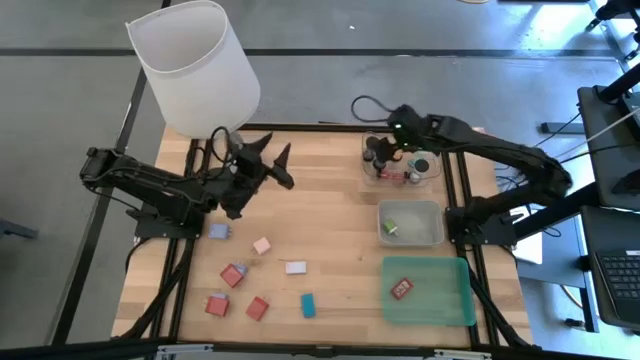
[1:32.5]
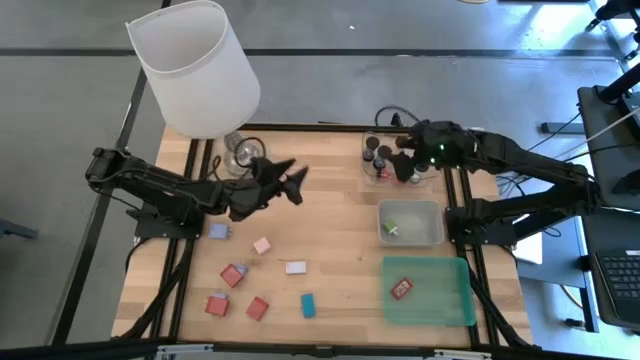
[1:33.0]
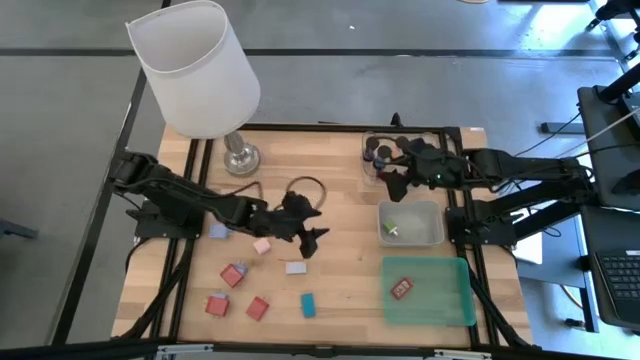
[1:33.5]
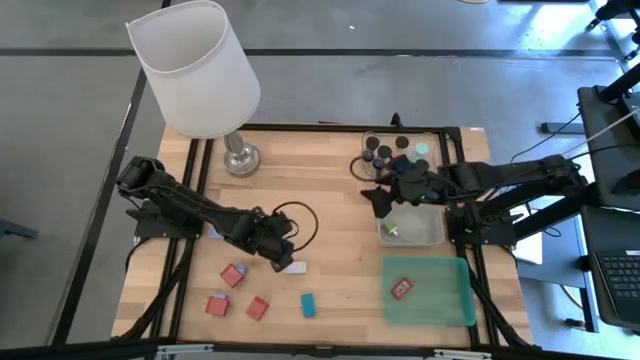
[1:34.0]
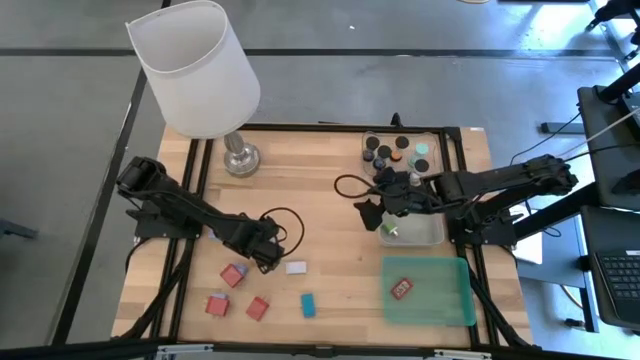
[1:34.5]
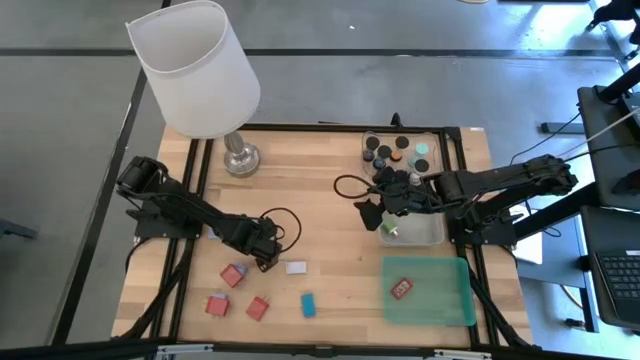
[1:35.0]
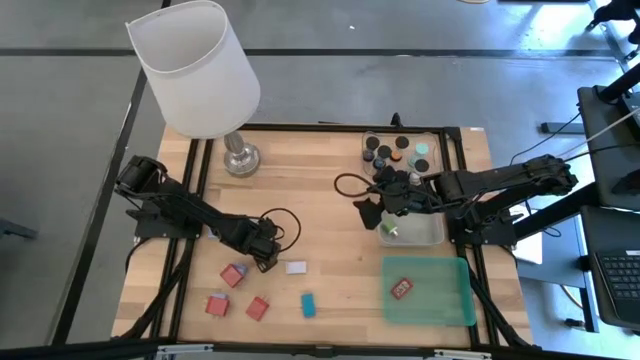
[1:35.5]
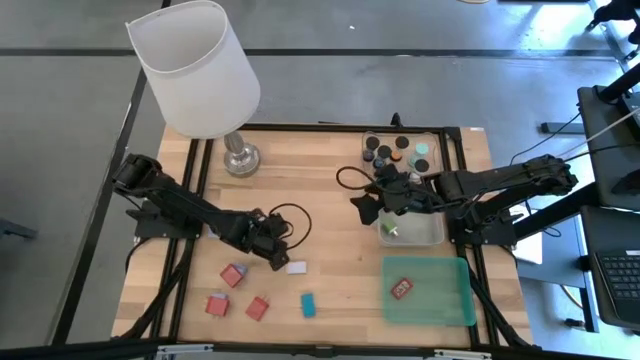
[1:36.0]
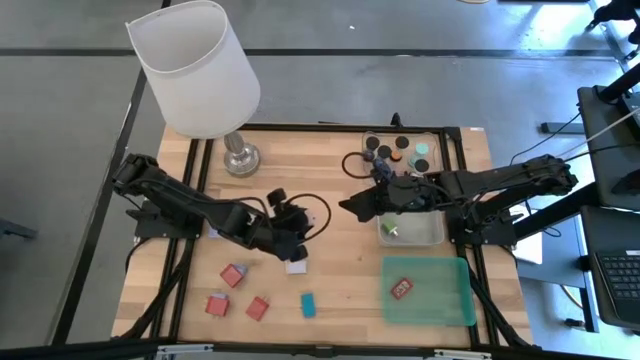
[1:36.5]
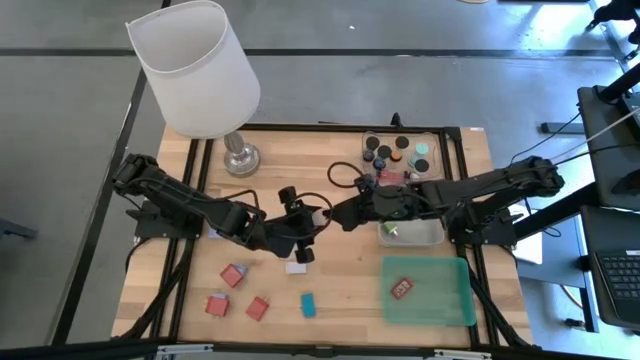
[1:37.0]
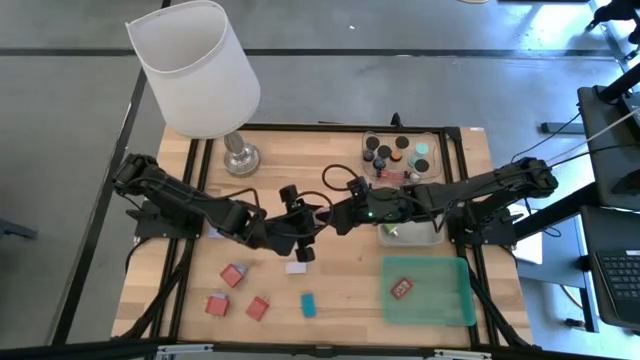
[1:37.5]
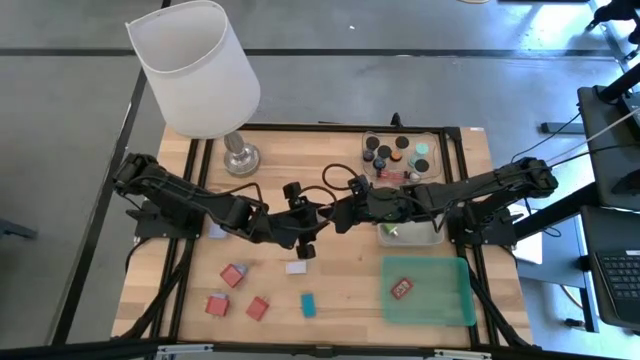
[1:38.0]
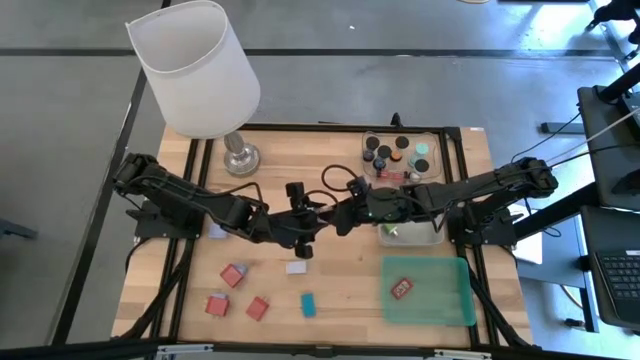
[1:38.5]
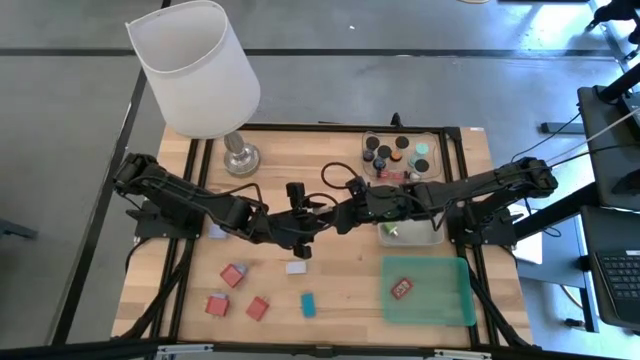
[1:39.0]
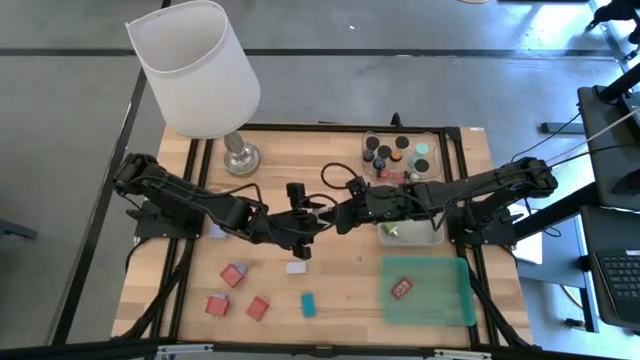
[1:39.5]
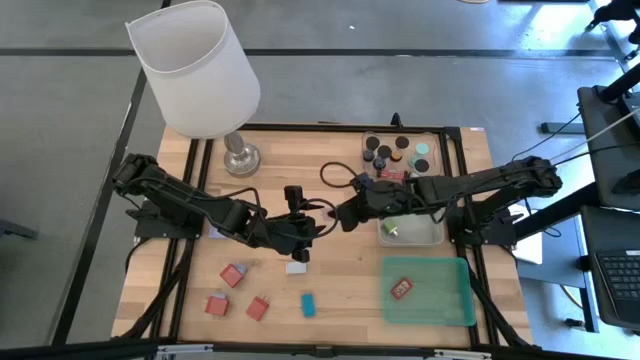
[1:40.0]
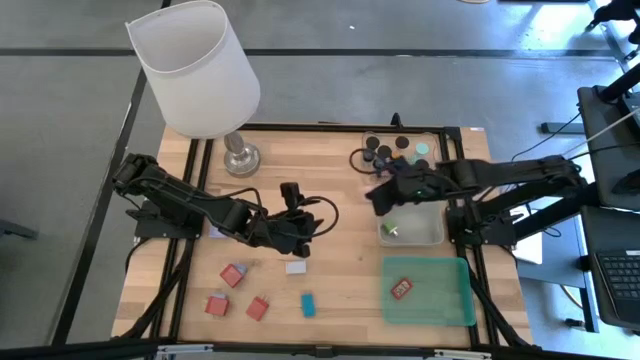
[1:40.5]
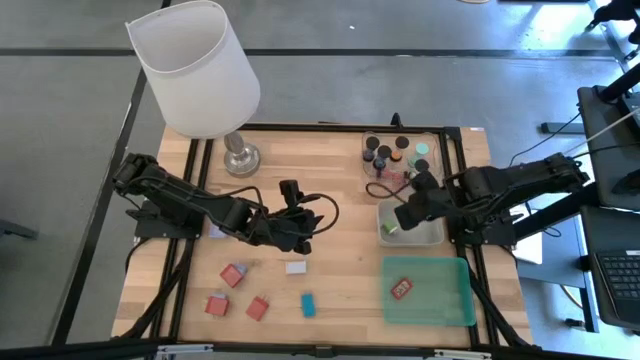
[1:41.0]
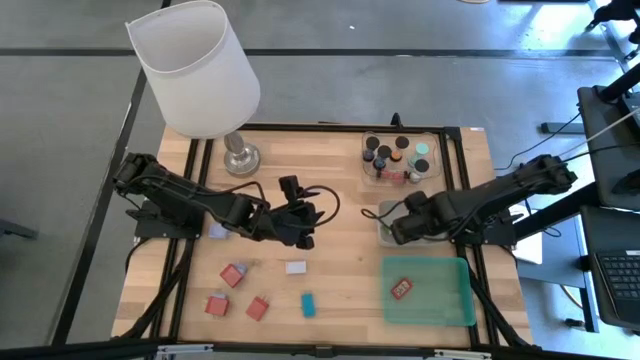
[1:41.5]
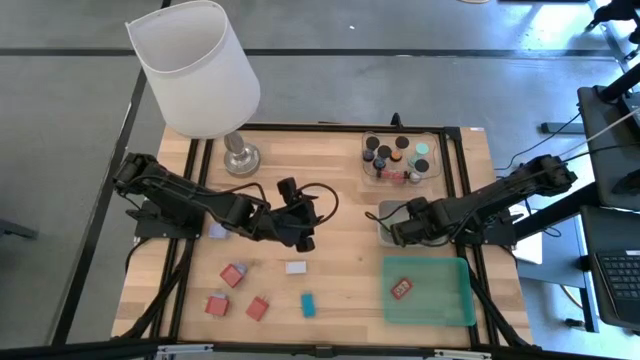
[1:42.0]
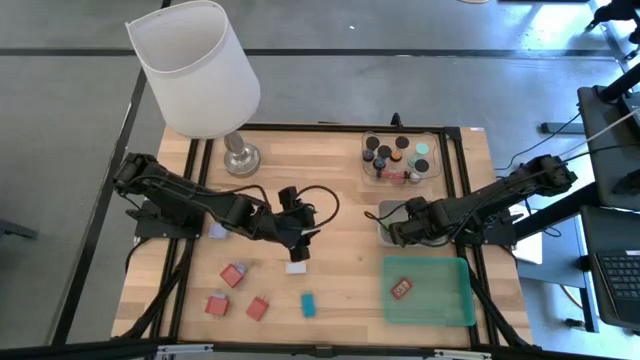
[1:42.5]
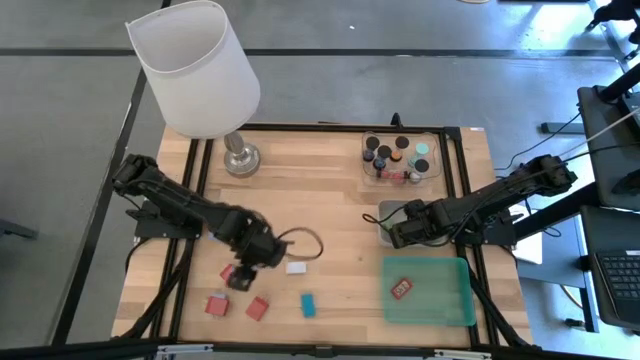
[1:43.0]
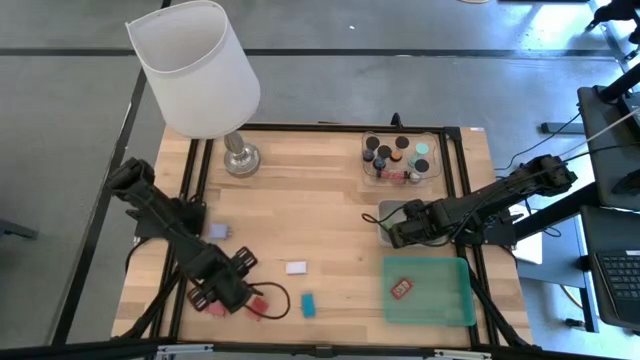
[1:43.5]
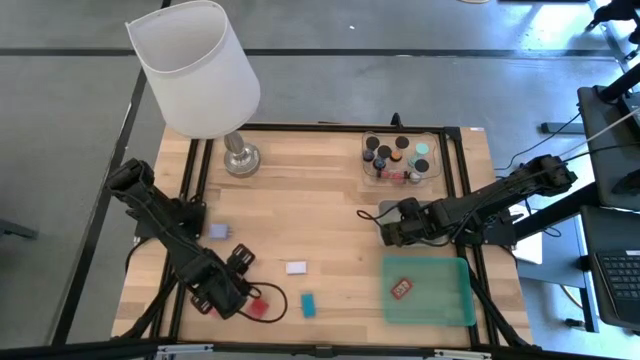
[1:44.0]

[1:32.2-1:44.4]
Task: Pick & Place Office items
Put the pink charger adapter into the white bin

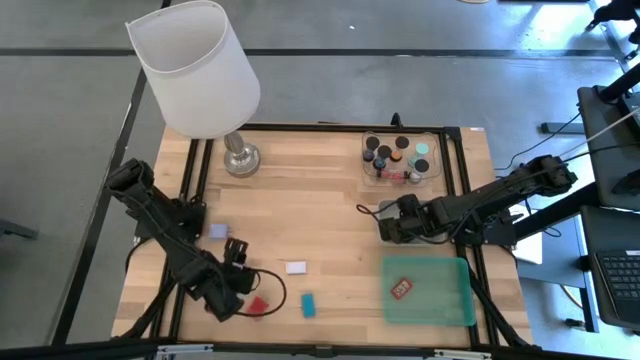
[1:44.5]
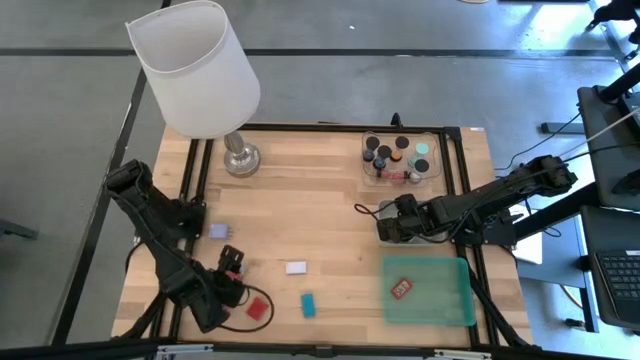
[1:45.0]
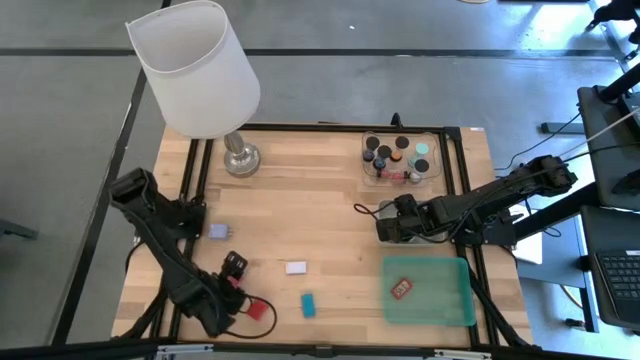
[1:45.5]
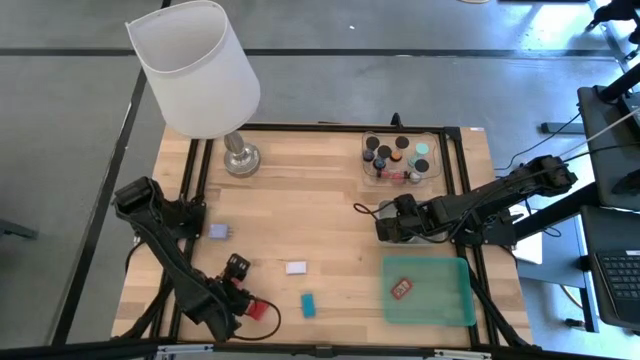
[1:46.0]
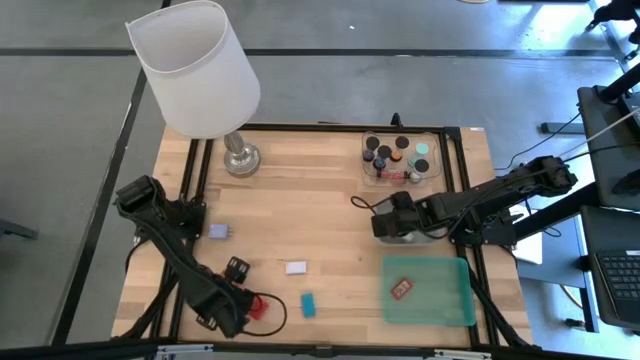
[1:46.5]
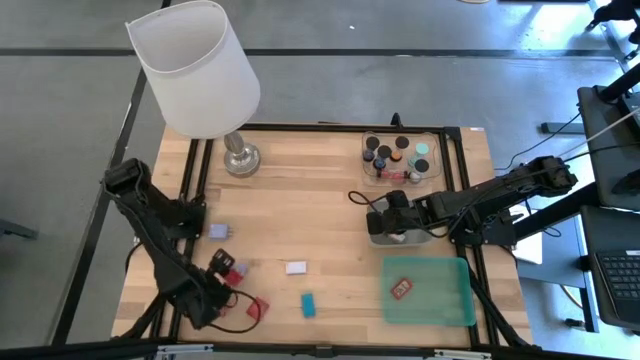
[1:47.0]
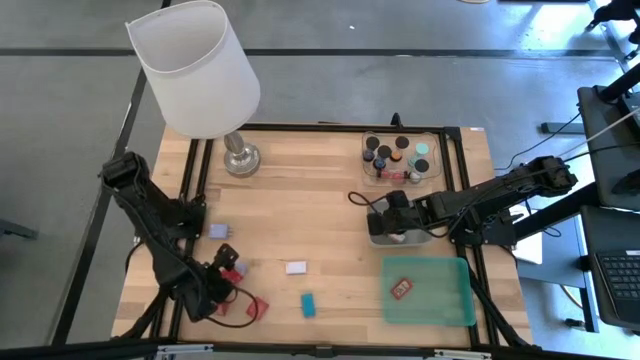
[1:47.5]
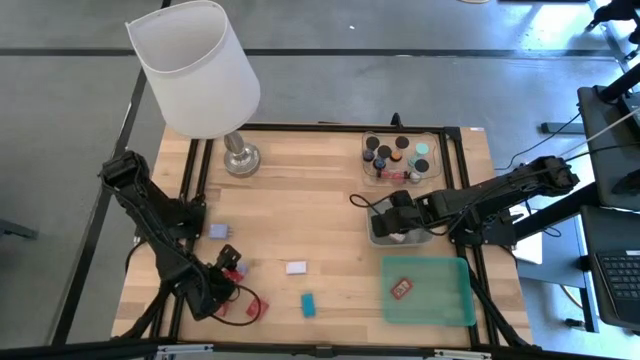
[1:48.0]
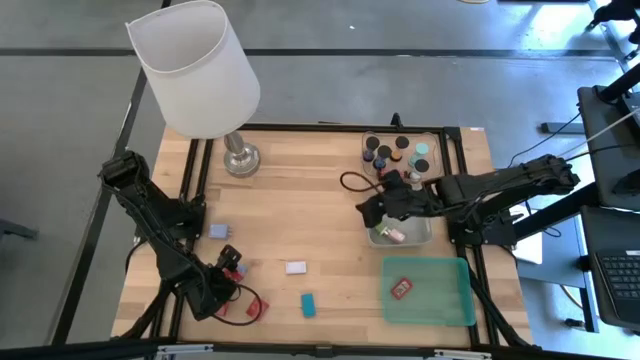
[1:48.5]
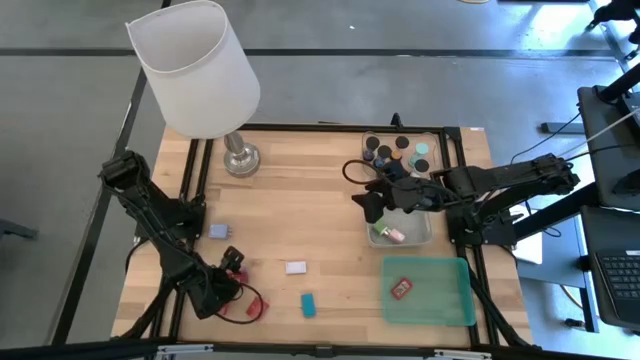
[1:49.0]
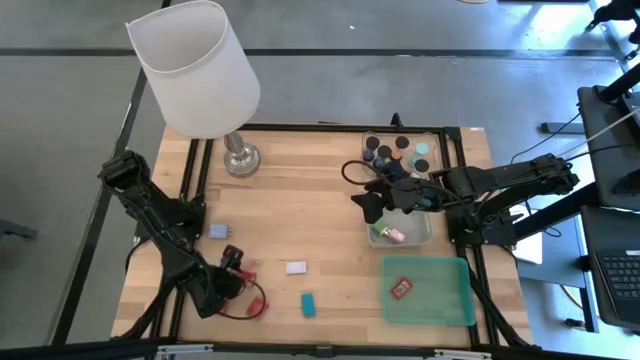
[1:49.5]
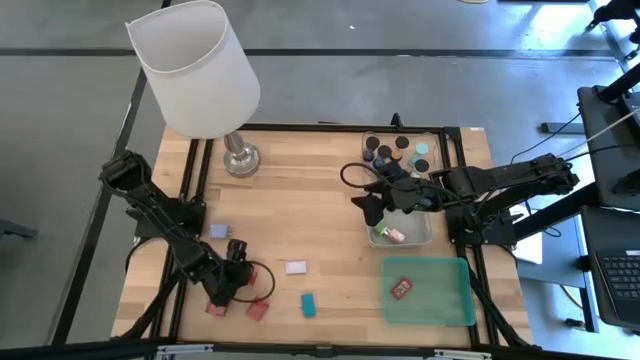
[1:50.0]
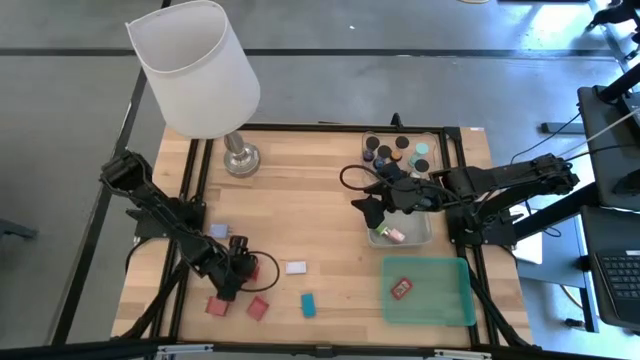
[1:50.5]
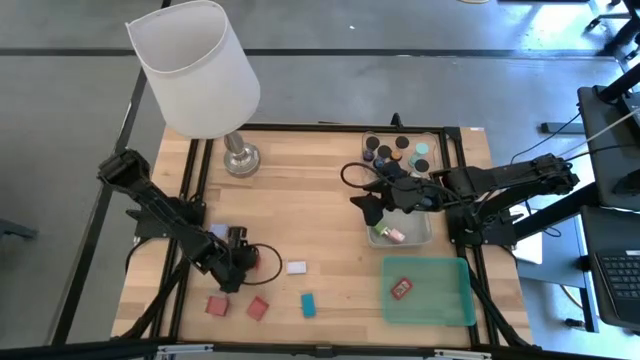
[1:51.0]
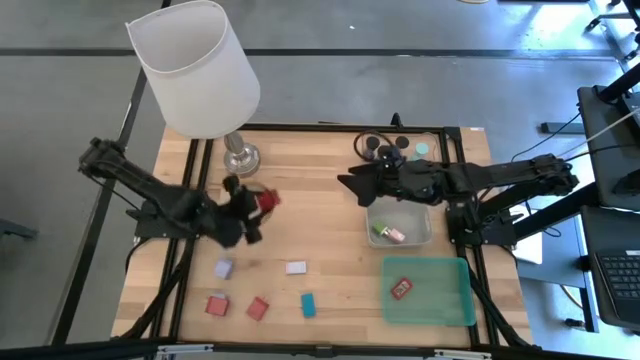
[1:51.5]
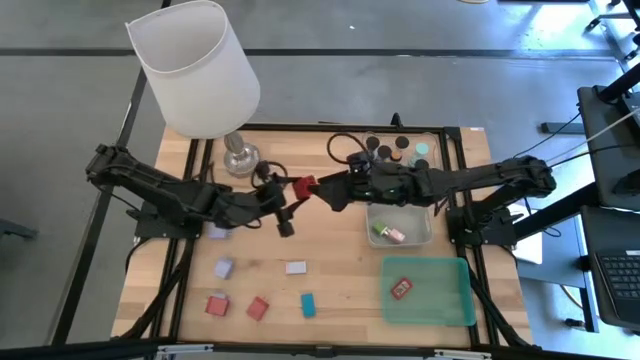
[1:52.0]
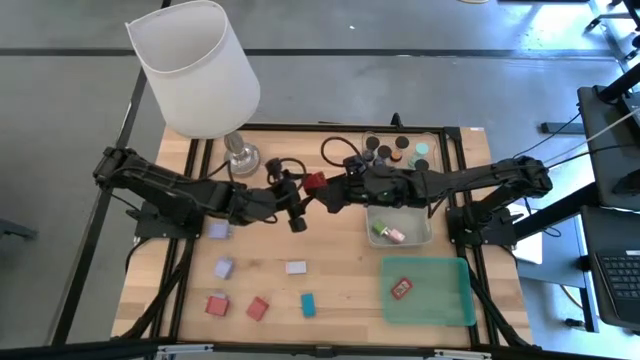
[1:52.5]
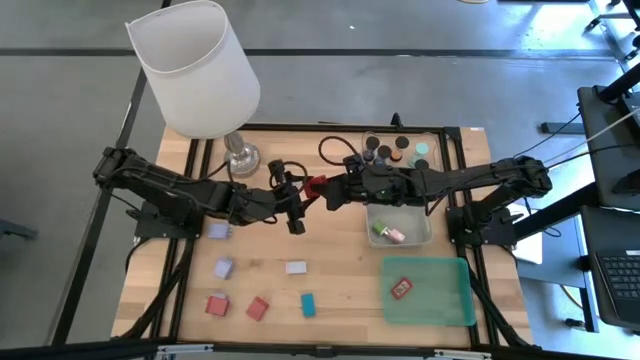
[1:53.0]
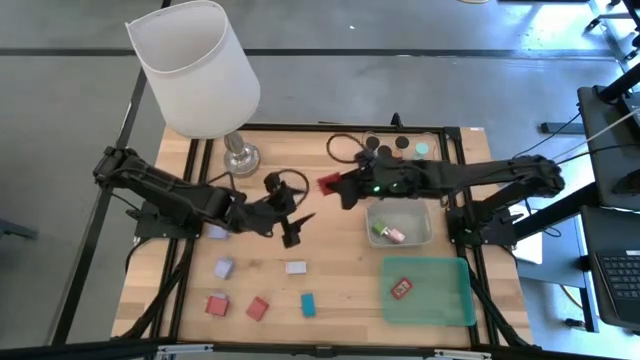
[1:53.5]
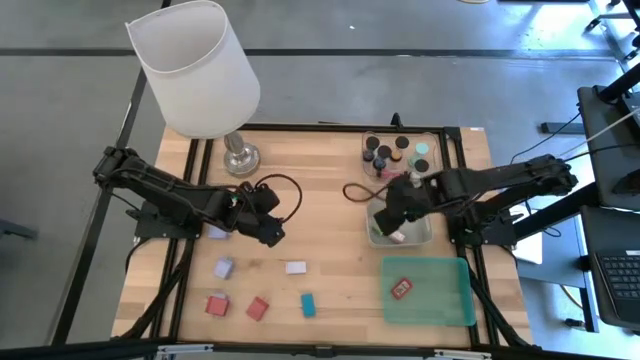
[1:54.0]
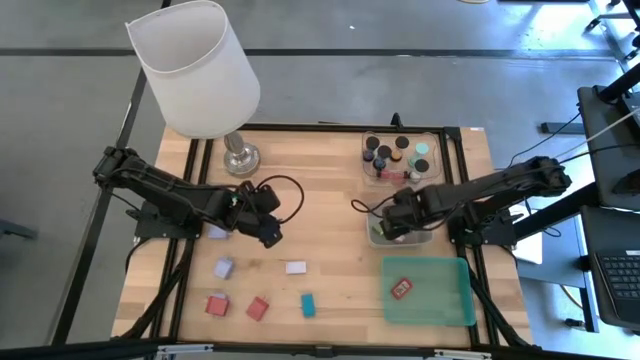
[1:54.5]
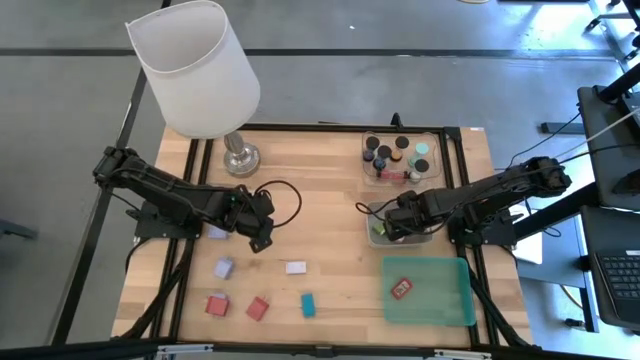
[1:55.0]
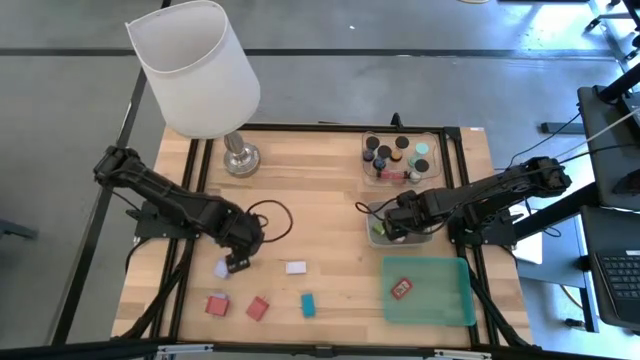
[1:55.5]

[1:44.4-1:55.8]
Put the top red charger adapter into the white bin
